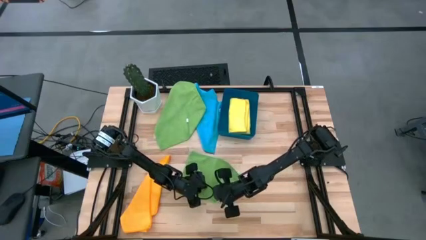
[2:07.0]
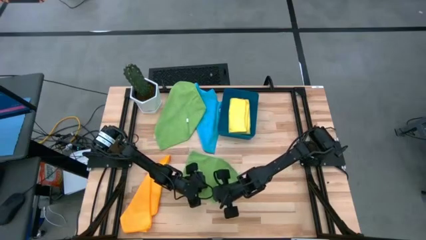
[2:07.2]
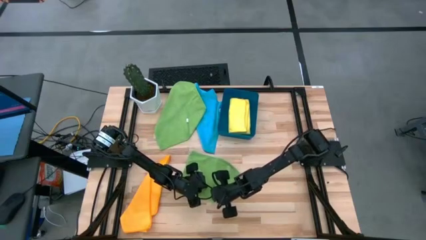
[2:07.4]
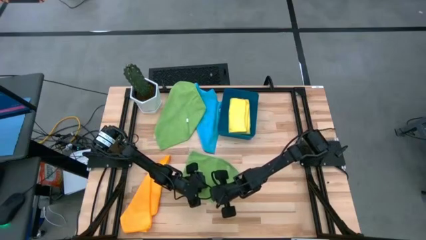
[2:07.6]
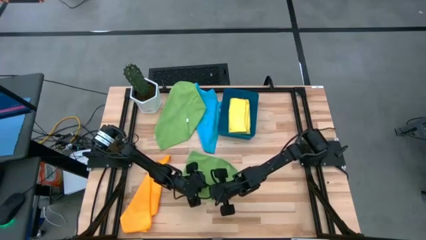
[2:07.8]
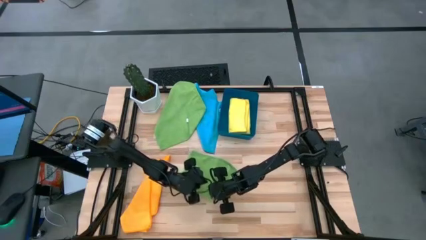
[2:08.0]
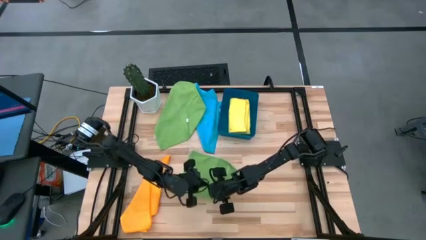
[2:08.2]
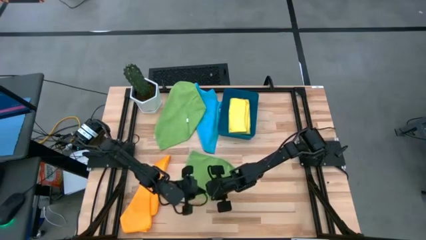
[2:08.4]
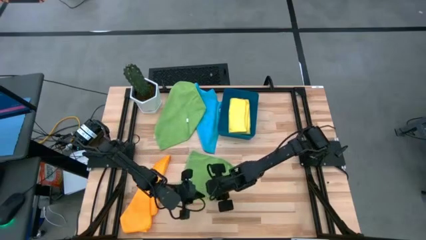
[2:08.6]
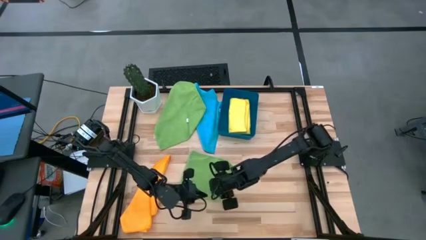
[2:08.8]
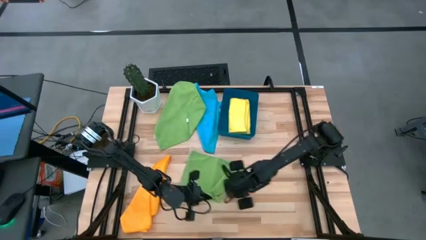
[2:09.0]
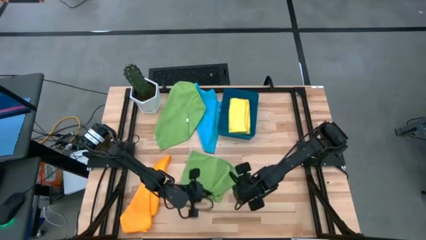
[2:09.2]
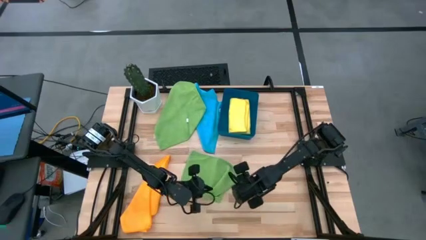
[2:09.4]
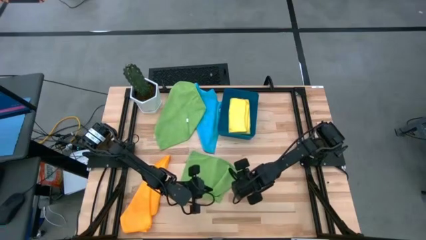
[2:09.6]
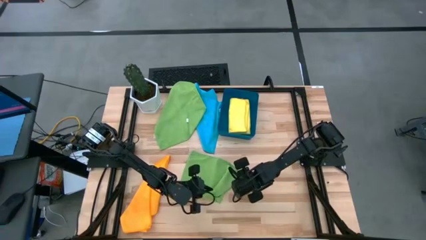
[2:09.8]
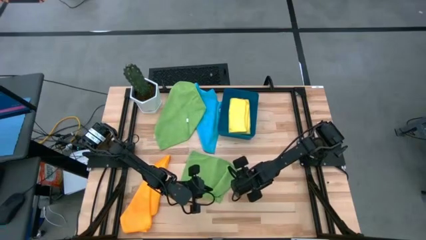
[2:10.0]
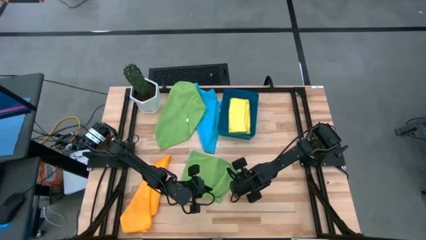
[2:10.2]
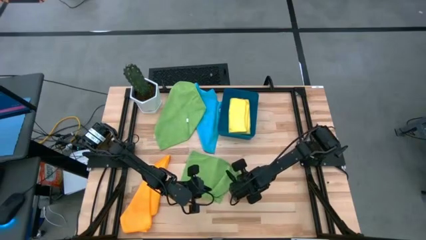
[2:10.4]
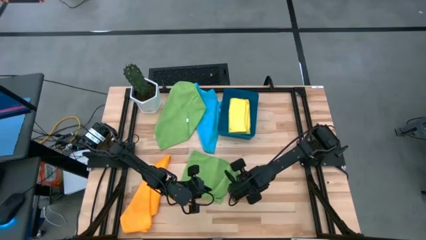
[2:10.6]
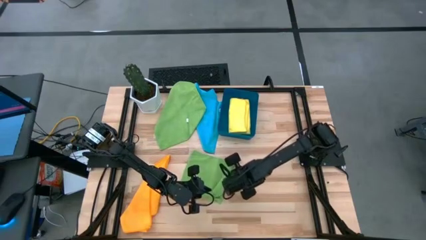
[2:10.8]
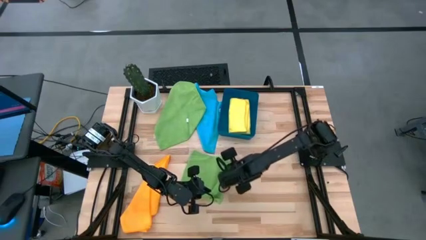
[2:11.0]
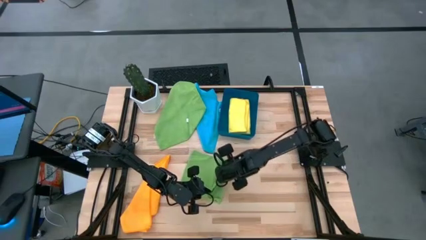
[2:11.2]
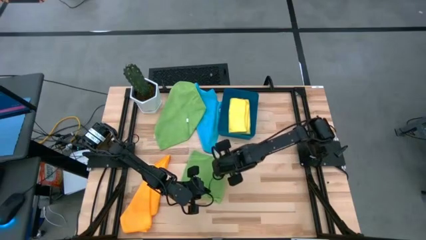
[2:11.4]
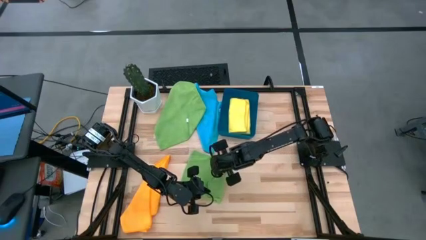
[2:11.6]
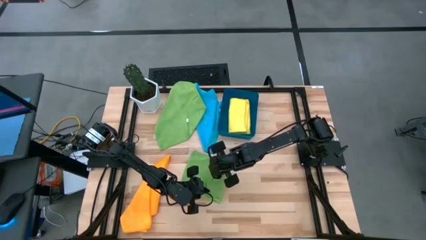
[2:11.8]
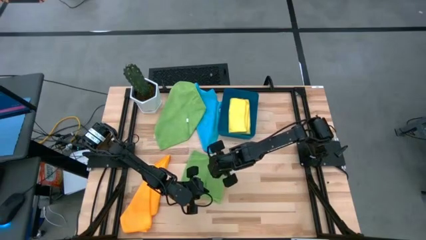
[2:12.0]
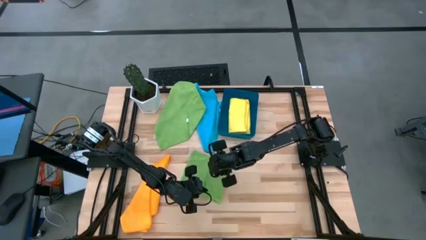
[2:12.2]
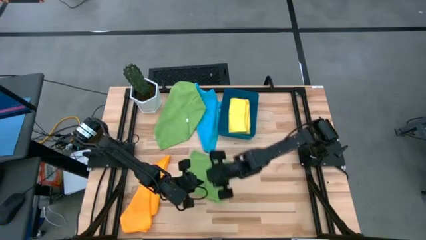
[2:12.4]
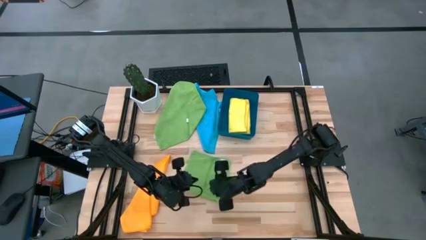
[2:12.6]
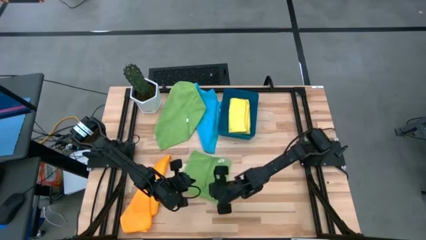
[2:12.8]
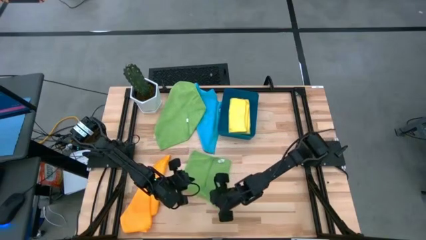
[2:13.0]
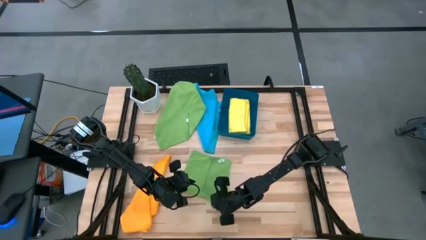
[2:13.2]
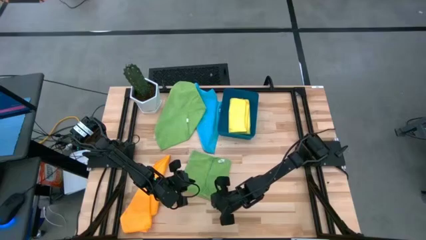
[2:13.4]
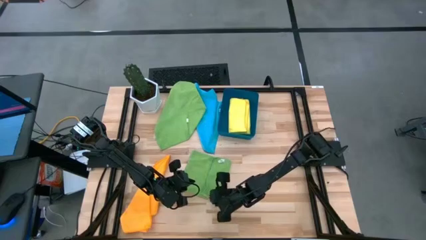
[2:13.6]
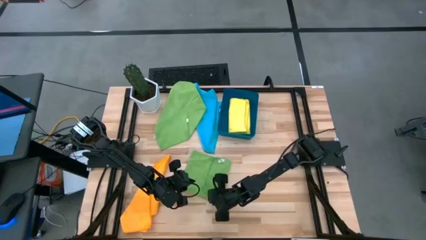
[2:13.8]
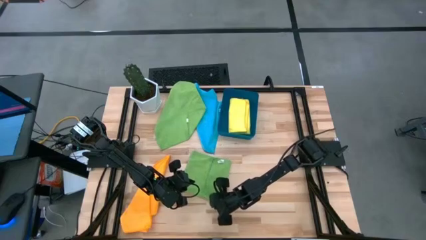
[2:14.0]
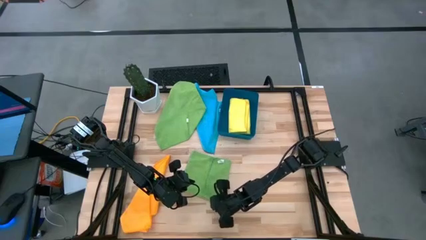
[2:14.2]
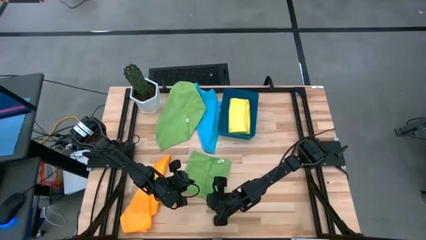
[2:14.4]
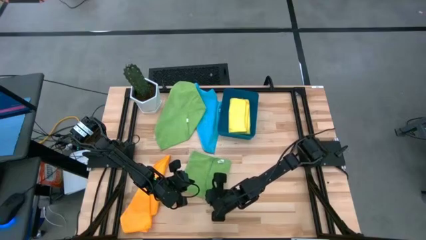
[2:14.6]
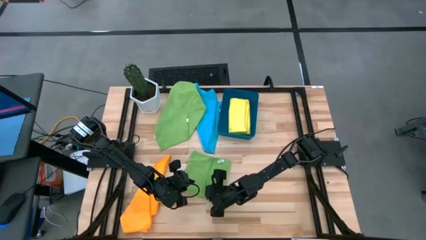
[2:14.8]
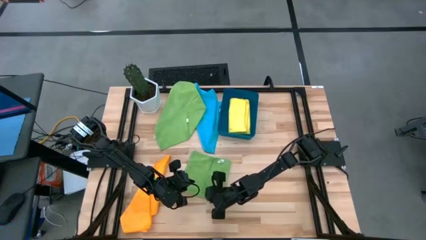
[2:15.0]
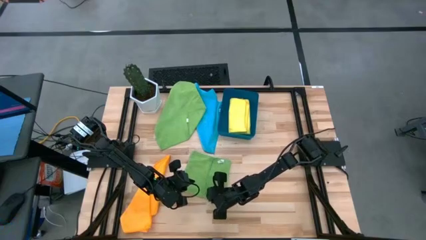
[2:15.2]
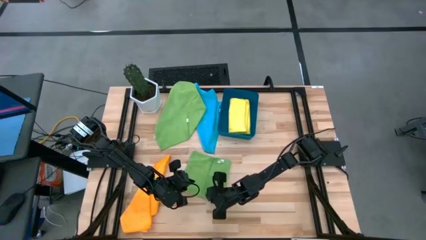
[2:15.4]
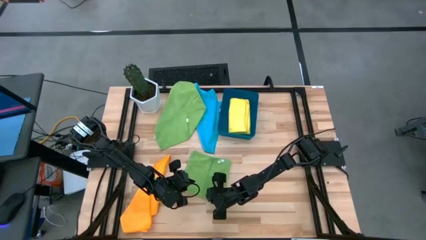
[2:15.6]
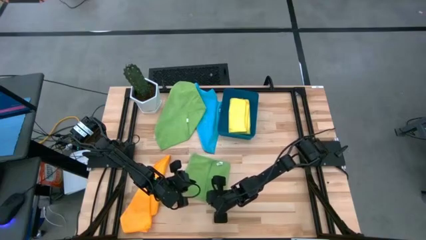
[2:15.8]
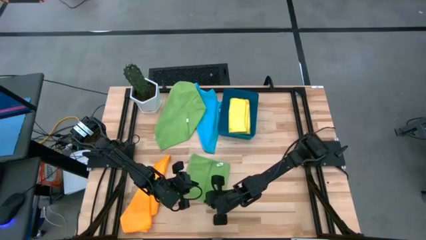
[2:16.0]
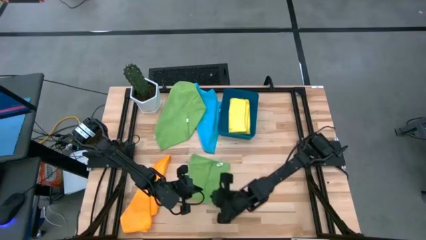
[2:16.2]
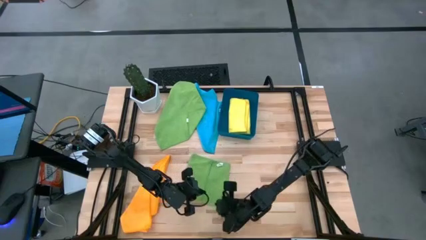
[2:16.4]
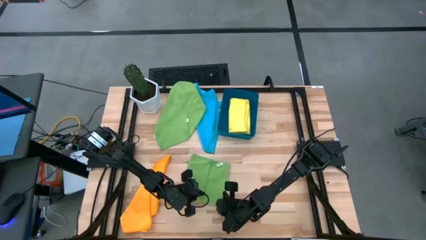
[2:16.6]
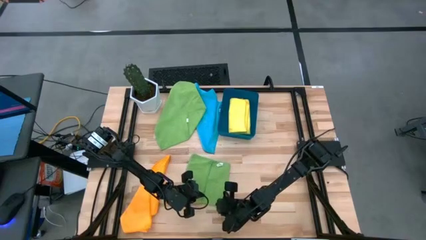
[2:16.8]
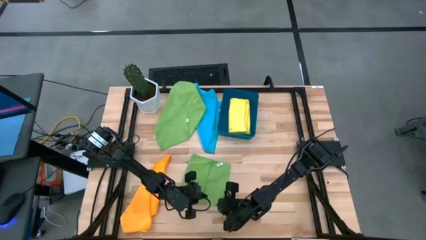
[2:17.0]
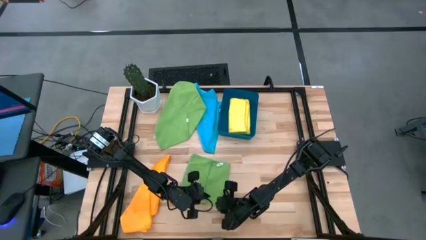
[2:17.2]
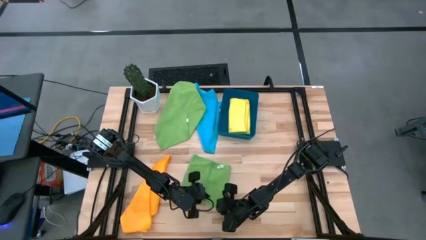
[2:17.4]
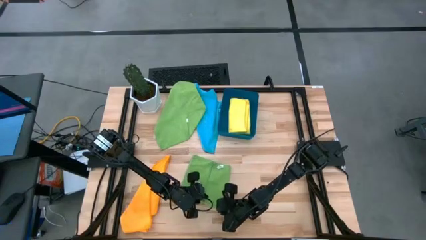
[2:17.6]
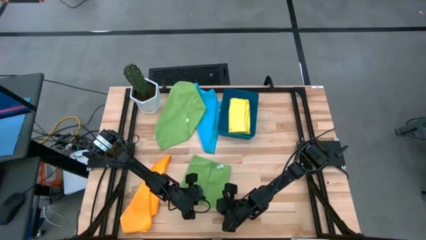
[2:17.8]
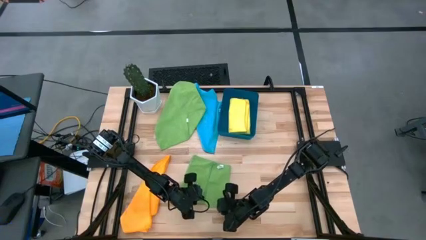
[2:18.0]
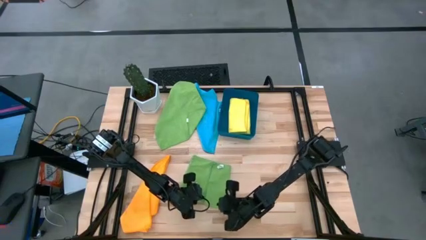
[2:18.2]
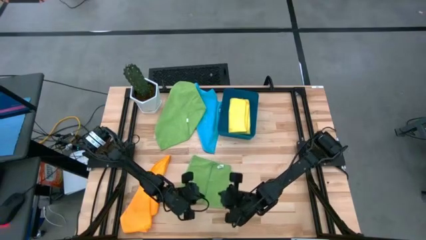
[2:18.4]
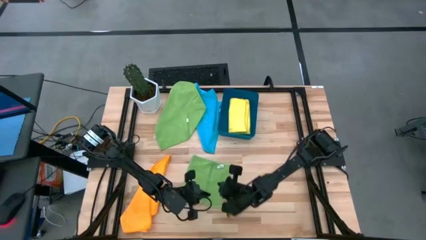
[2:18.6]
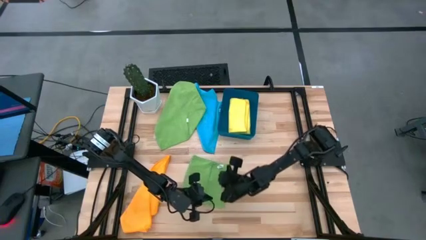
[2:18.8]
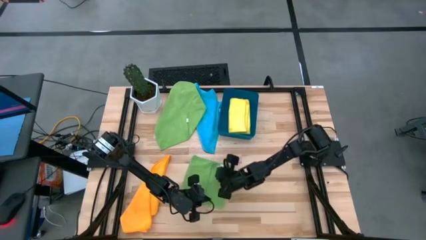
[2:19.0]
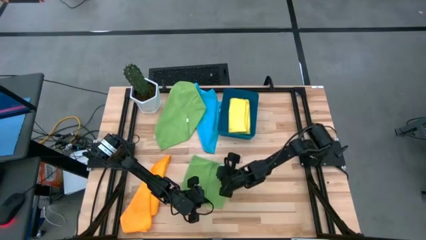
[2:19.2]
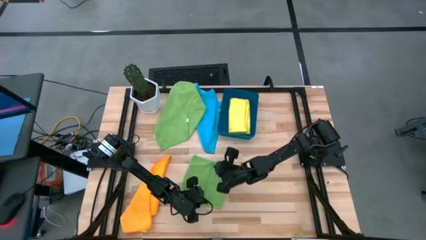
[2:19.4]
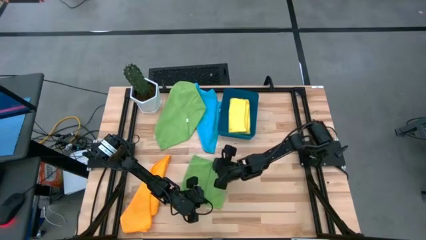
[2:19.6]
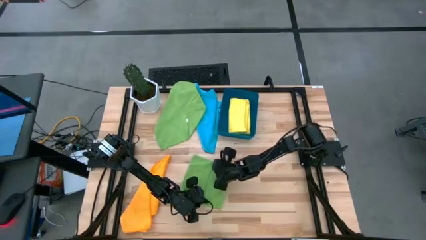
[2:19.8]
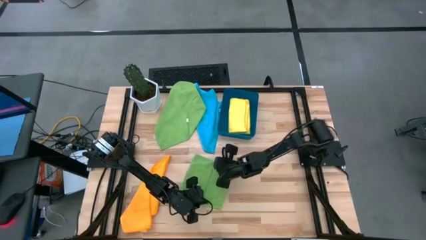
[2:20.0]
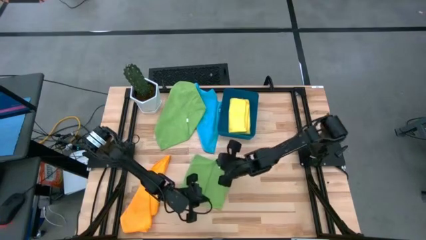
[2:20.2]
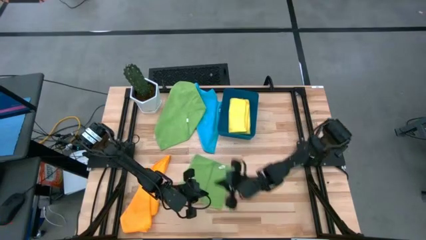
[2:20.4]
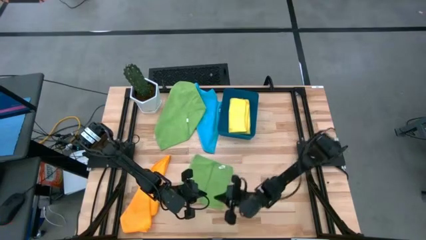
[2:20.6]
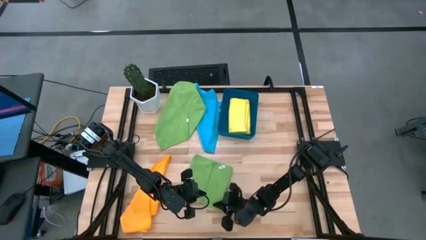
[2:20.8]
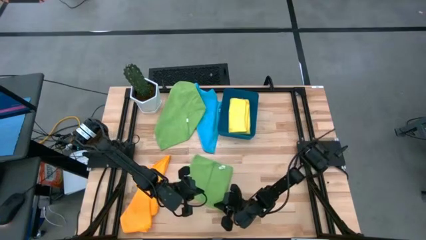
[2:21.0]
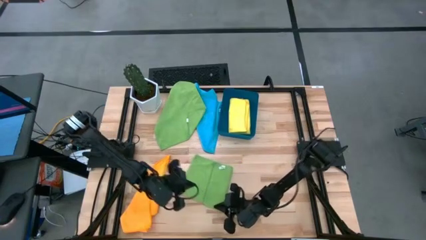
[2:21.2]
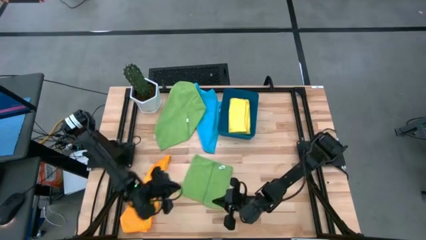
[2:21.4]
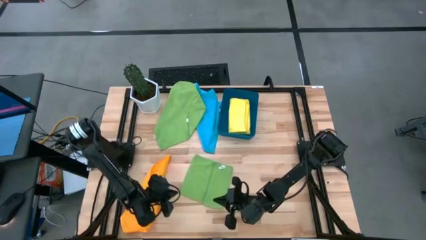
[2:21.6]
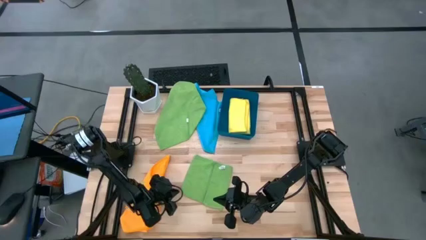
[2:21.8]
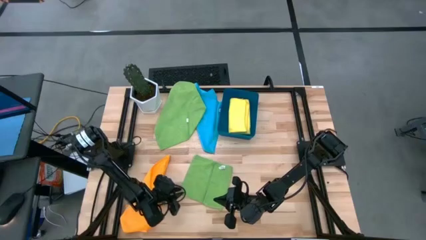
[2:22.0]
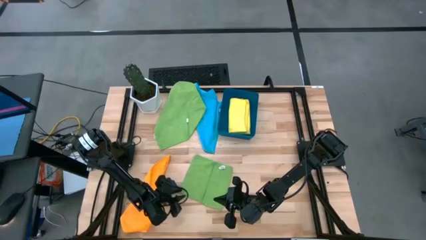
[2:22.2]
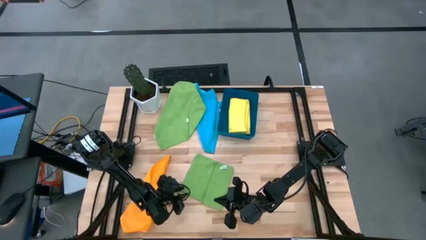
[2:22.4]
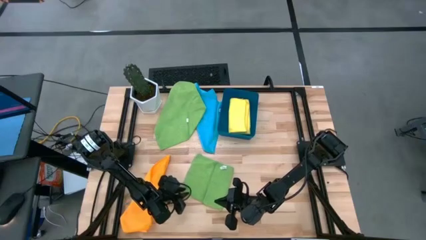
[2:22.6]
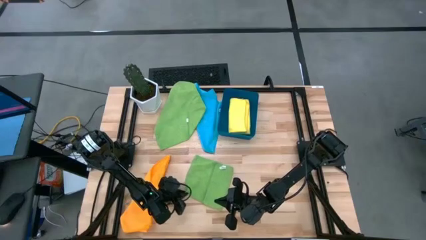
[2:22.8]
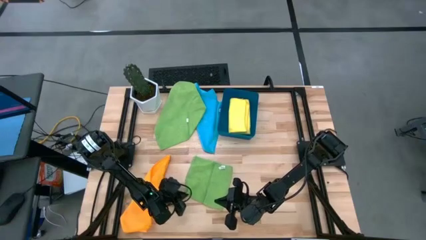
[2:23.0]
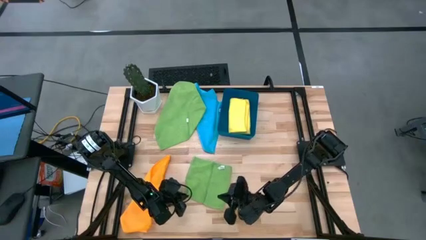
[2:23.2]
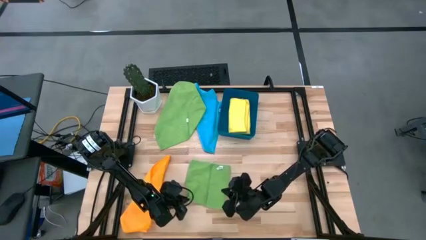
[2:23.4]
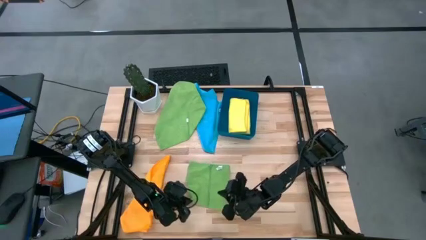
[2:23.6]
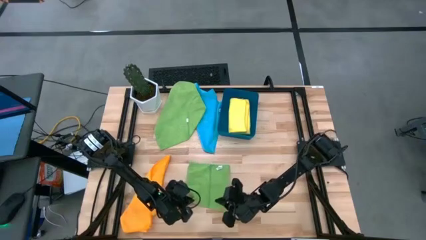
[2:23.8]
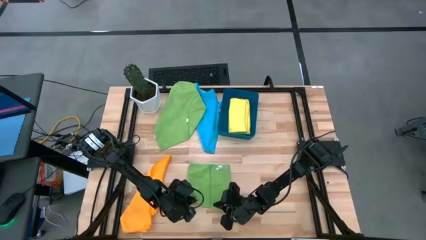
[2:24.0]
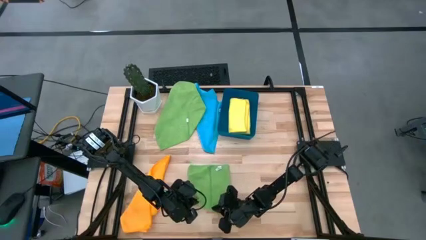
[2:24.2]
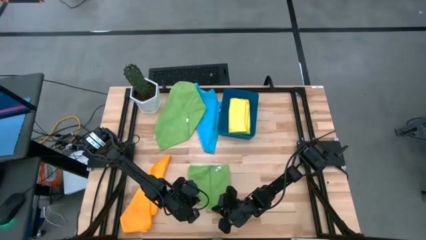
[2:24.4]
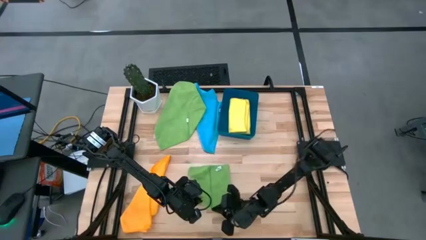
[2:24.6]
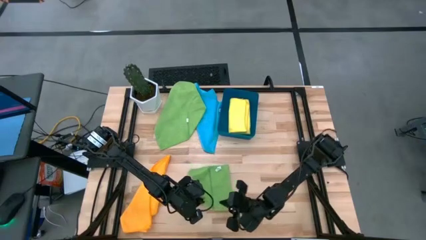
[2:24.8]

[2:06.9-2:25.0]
Task: Fold microfiber towels
Fold the right green towel
